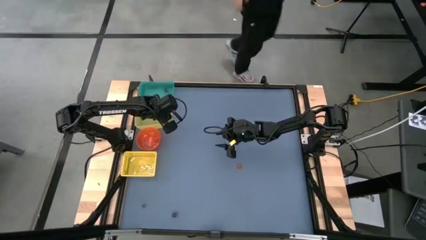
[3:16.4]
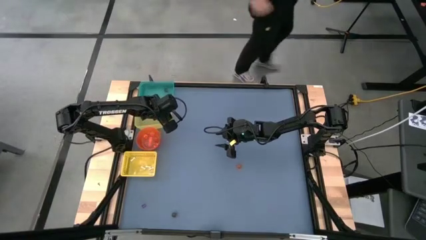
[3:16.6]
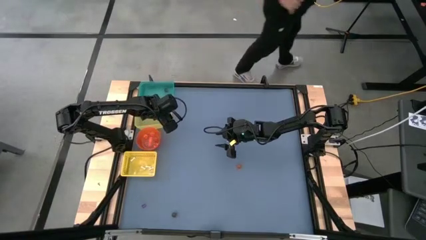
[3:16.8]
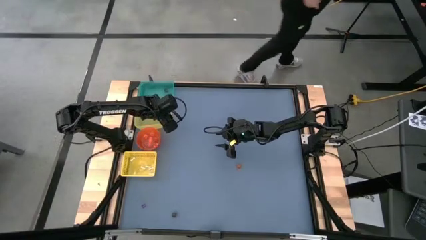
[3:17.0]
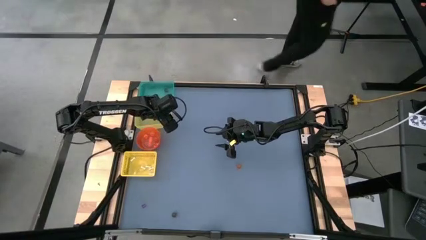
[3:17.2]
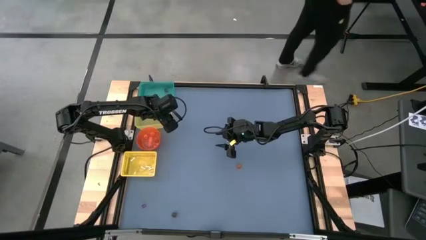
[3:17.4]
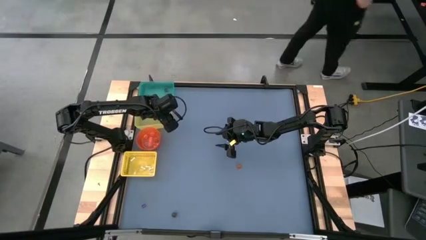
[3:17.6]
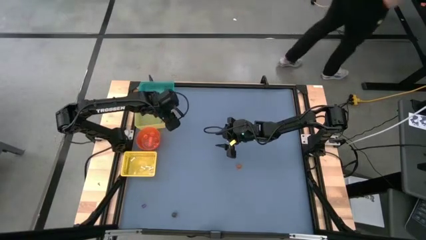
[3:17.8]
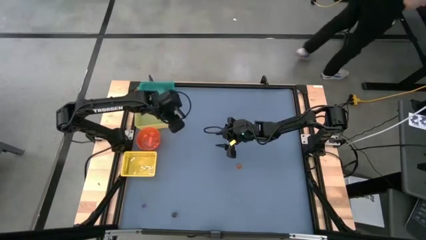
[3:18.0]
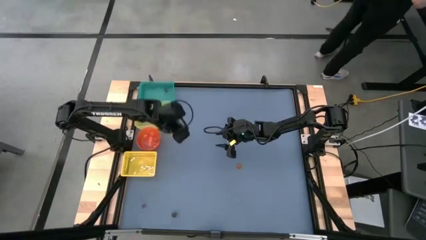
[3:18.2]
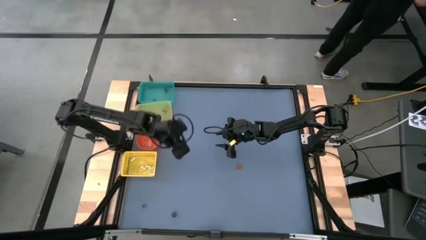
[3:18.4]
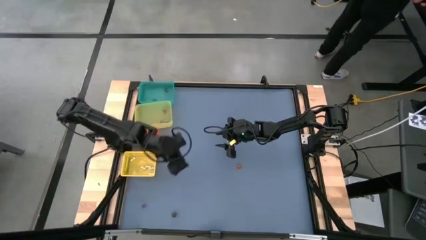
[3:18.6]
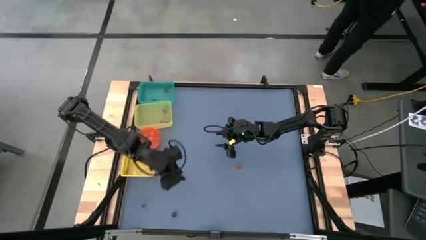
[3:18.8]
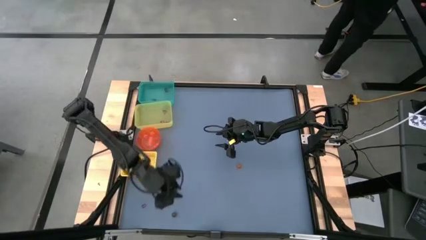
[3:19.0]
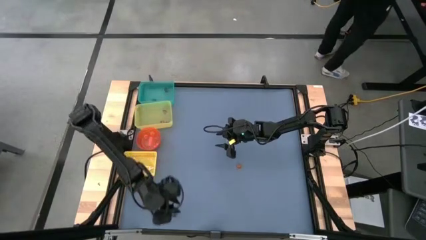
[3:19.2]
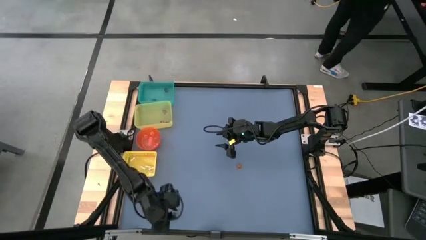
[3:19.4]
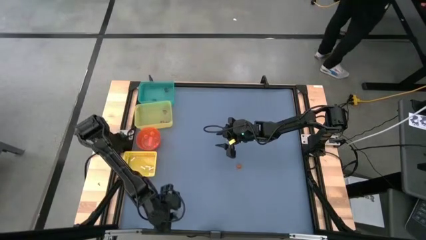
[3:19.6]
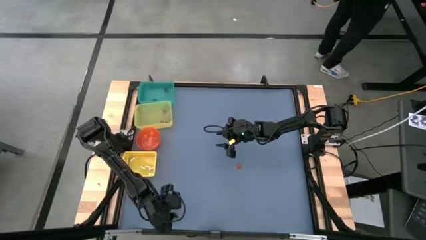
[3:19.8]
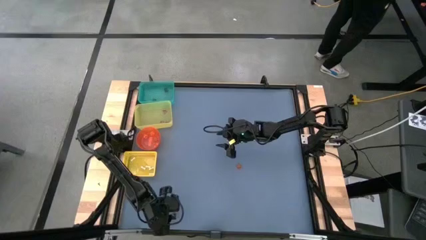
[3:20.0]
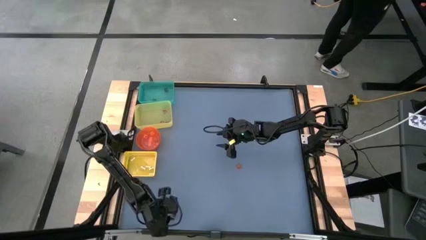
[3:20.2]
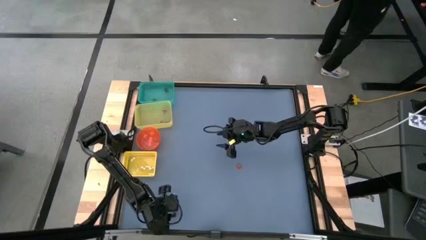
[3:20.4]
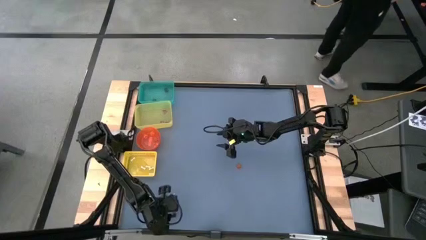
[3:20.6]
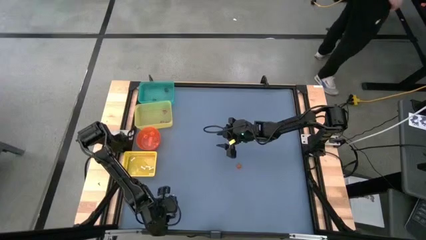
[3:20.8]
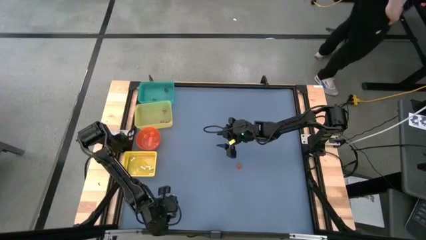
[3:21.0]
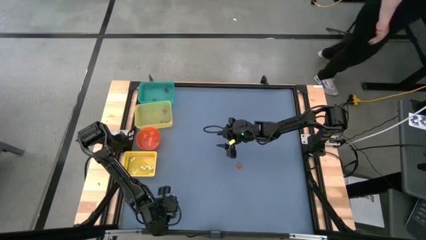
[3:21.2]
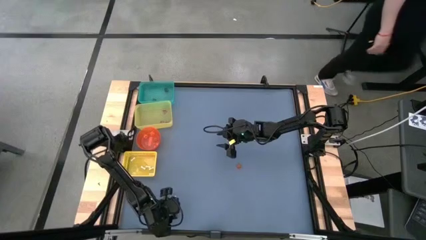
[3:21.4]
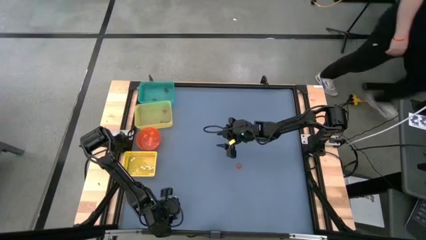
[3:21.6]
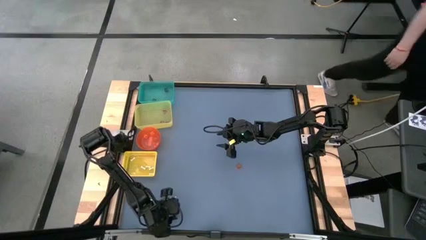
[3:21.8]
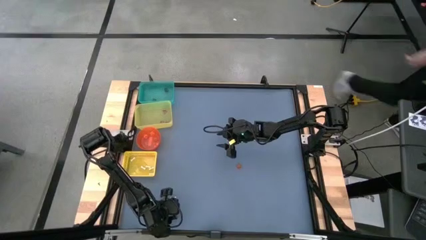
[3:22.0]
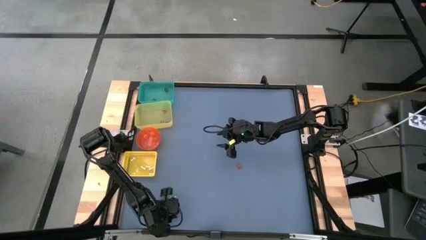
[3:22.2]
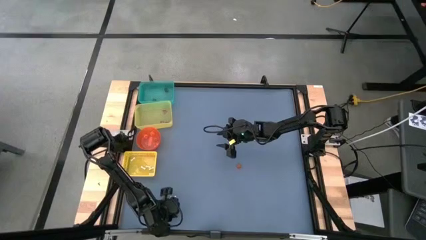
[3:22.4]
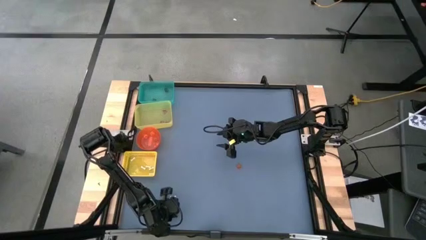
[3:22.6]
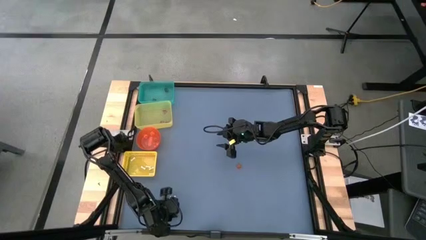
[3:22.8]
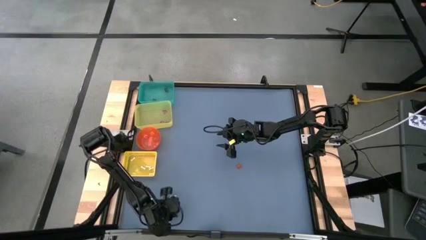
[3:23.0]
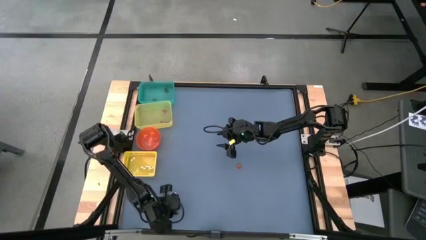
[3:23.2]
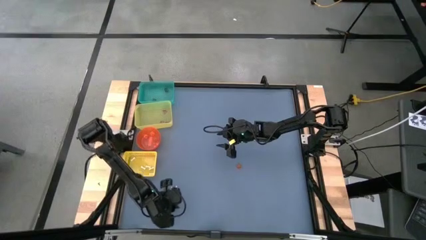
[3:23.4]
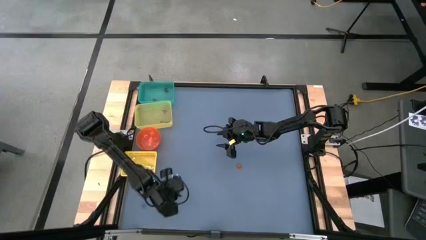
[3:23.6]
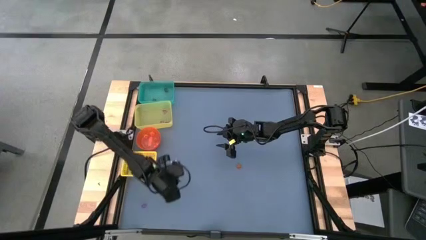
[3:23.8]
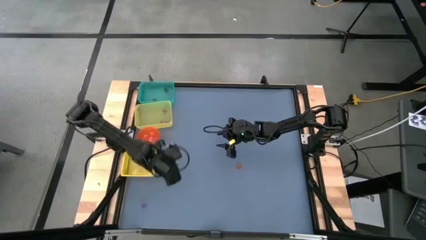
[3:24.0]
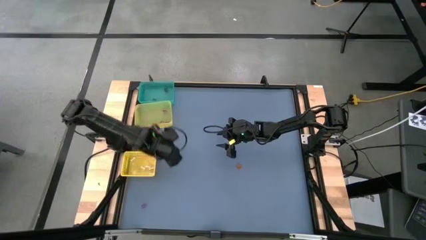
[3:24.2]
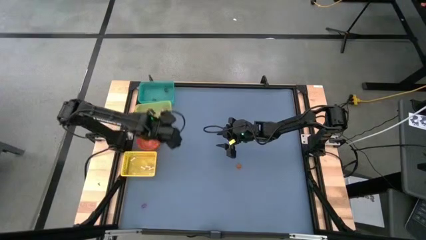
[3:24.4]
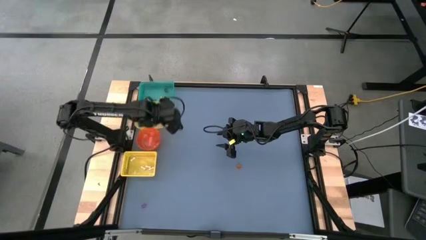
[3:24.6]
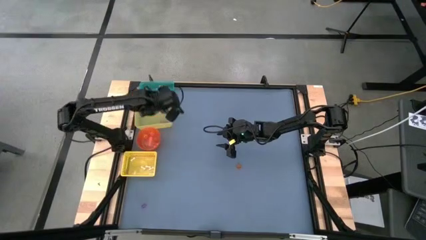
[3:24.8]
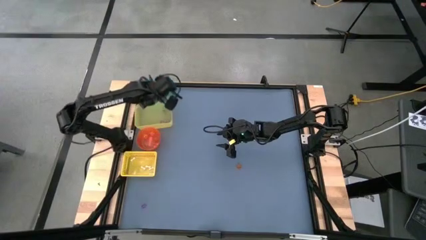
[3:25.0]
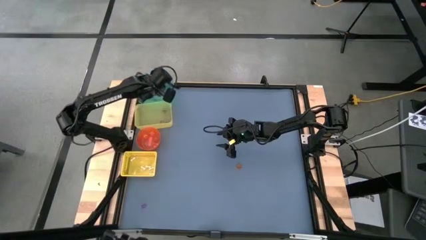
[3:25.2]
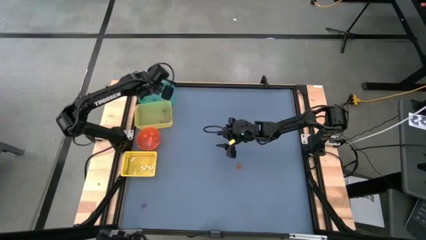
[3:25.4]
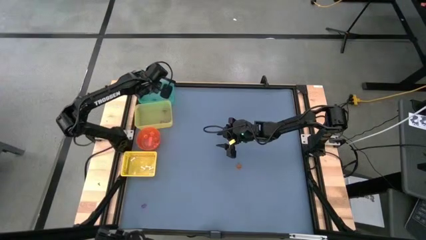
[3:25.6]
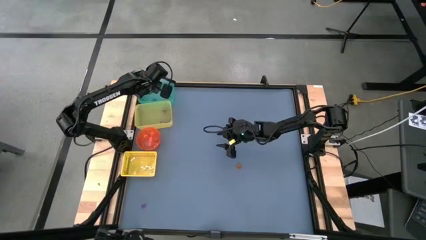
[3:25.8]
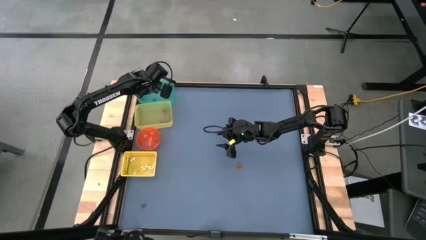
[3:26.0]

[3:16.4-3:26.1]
Task: Sort Halloween decoration
Put the black skull toy into the green bin

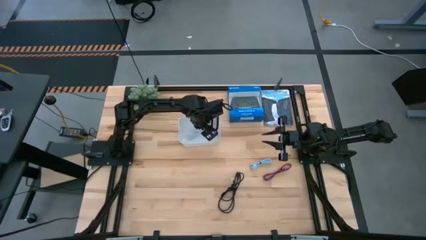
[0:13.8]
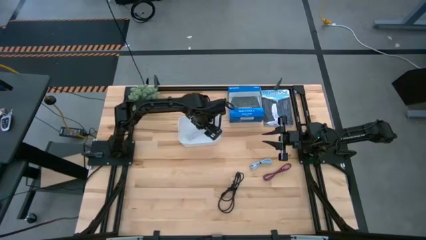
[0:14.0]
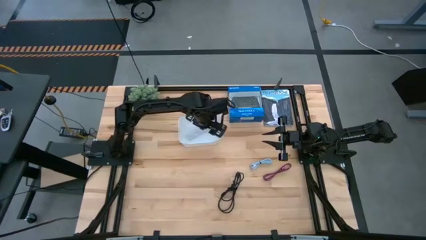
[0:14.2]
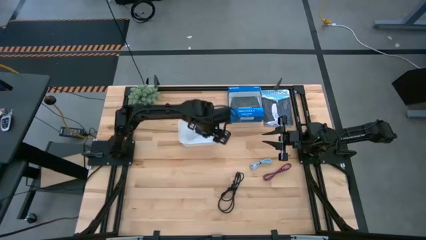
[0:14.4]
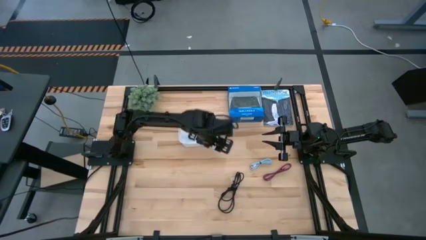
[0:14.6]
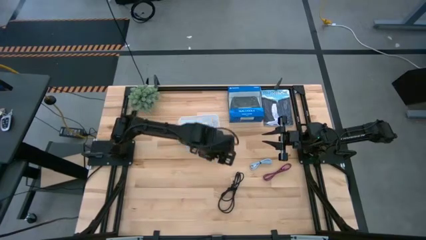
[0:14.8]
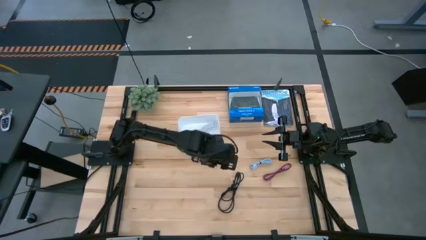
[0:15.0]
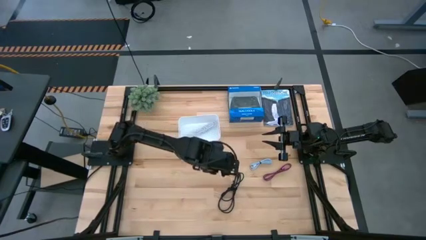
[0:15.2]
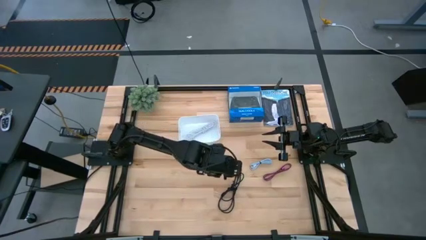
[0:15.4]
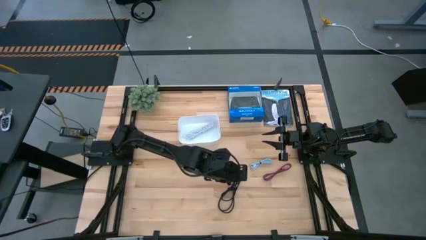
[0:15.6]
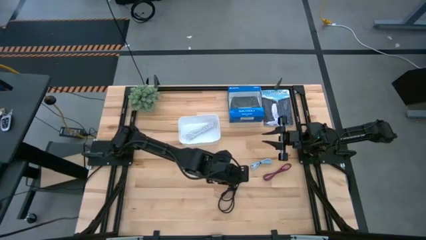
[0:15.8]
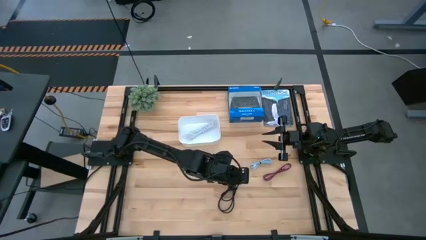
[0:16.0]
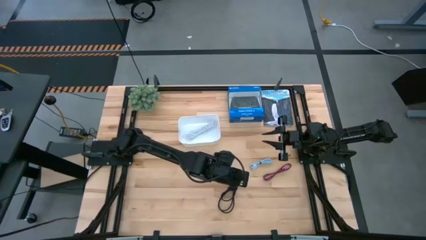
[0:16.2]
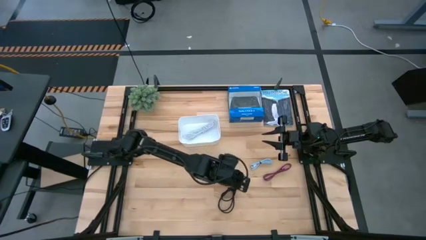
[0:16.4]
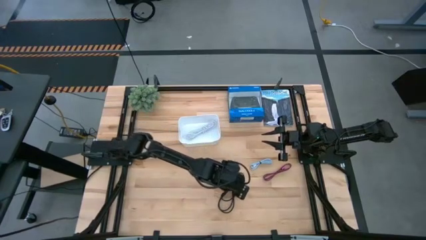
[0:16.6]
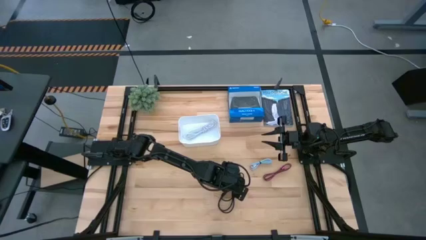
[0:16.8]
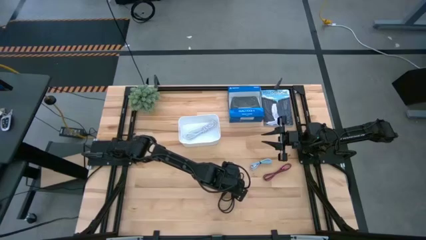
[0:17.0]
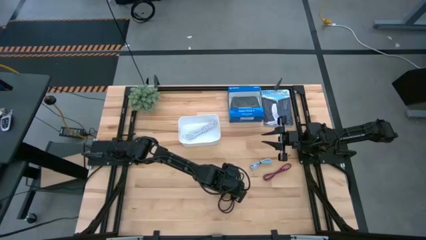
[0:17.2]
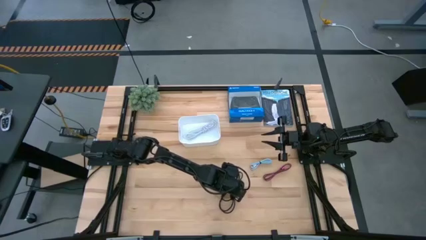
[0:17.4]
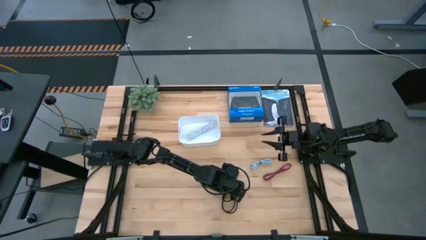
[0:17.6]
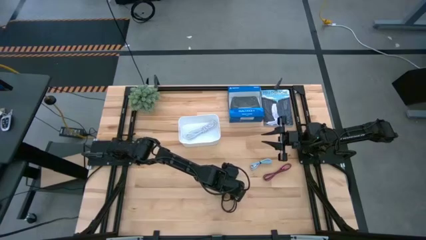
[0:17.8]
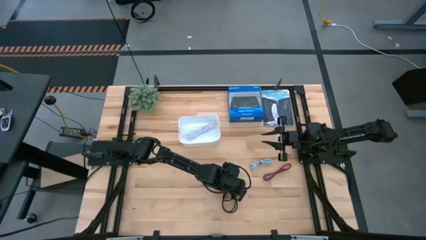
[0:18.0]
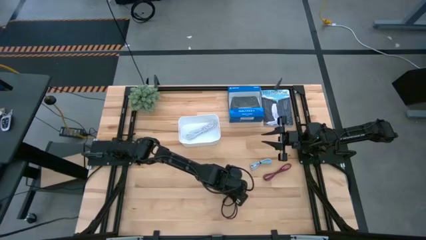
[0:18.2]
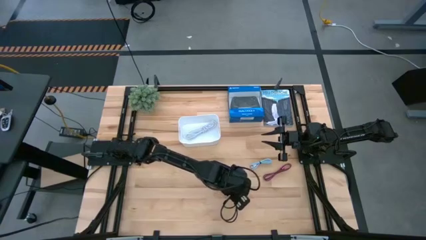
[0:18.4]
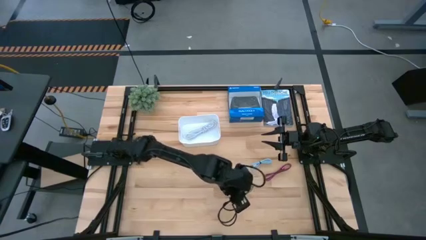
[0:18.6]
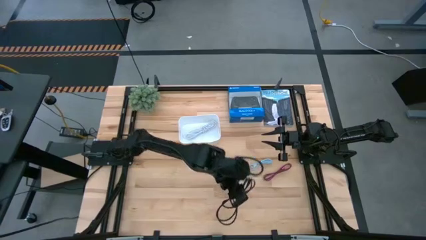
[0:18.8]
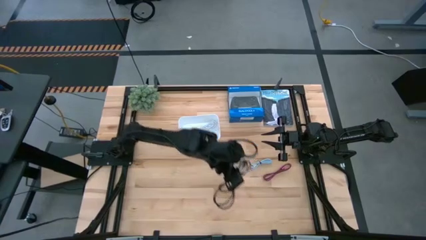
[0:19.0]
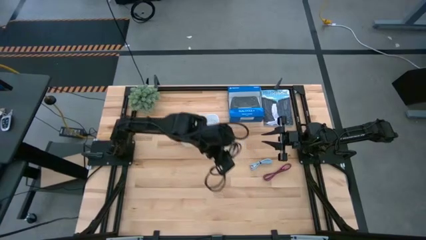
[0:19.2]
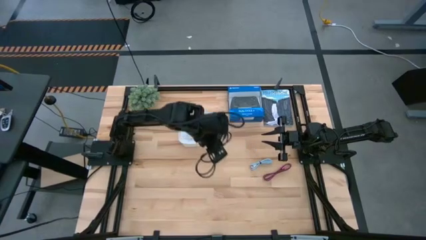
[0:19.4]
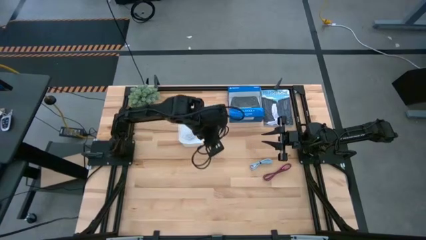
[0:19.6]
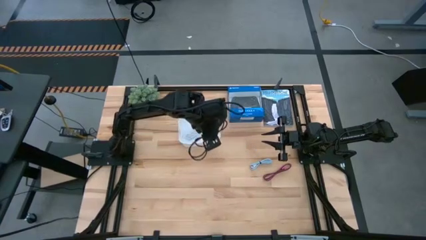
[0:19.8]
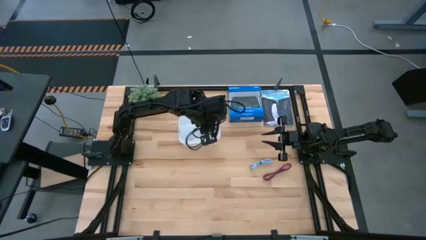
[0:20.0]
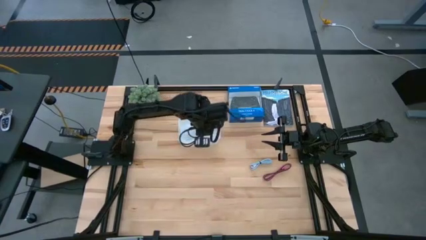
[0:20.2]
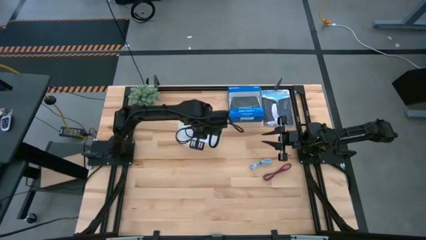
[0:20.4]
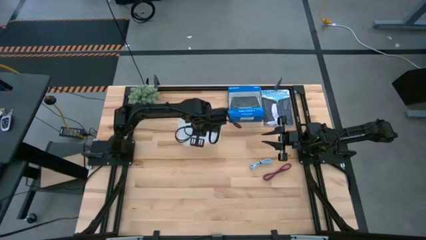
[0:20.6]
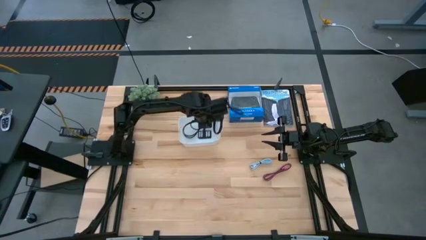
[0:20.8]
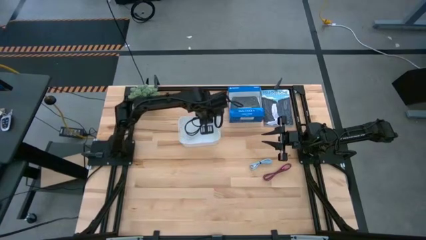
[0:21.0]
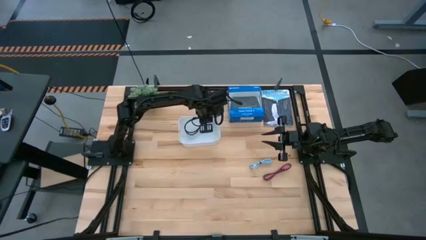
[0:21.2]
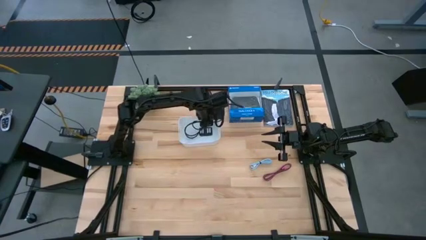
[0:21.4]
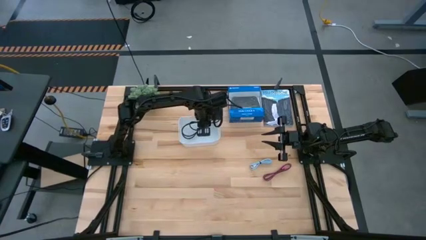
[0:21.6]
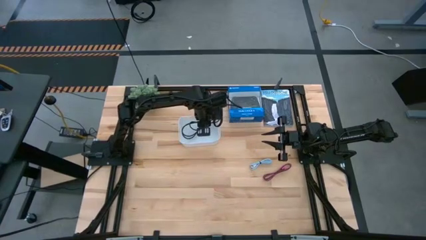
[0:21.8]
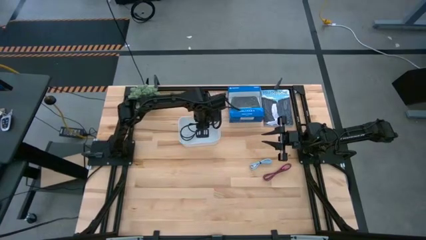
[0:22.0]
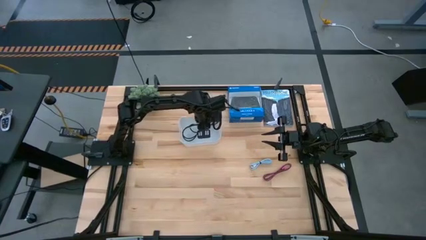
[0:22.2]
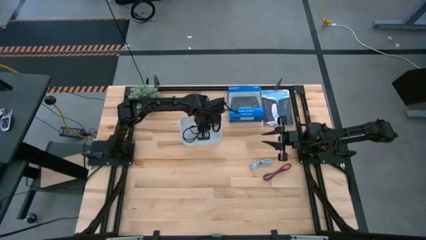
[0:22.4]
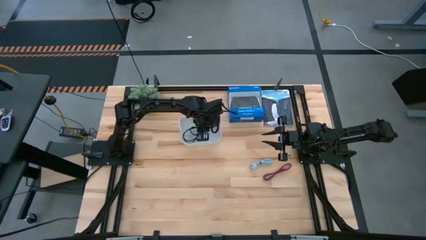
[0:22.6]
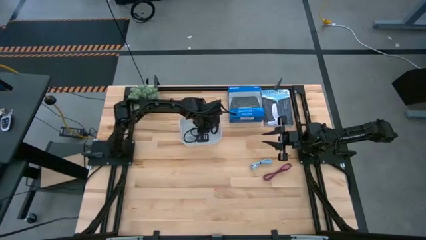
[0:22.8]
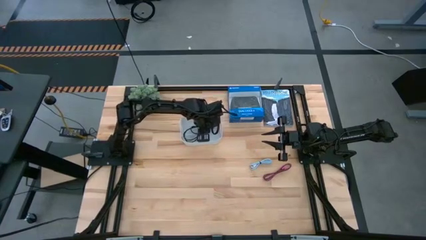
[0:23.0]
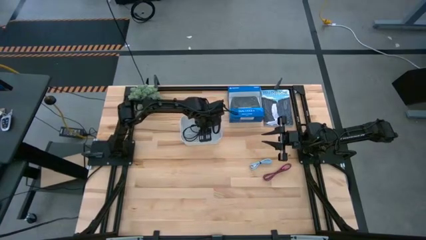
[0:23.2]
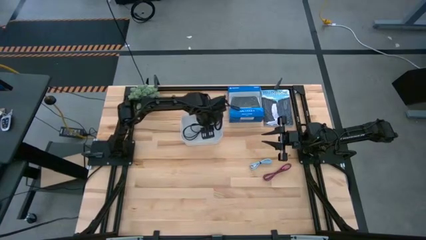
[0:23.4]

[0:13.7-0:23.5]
Task: Pick and place USB-C Cables
Put the black charger cable into the white bin
